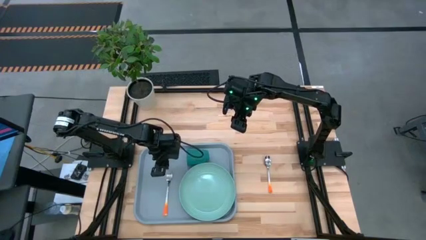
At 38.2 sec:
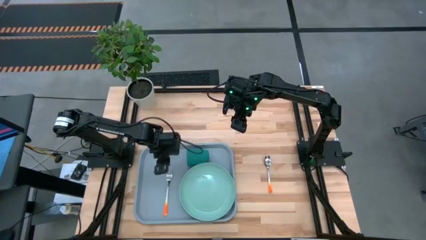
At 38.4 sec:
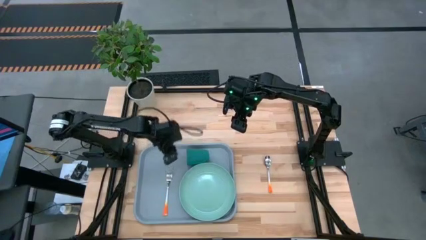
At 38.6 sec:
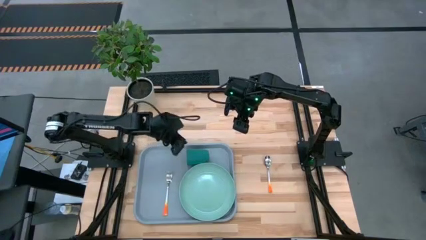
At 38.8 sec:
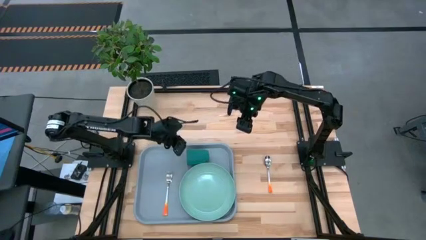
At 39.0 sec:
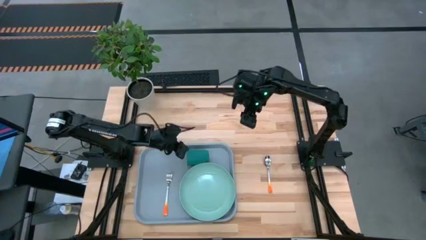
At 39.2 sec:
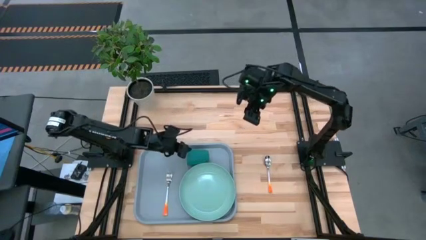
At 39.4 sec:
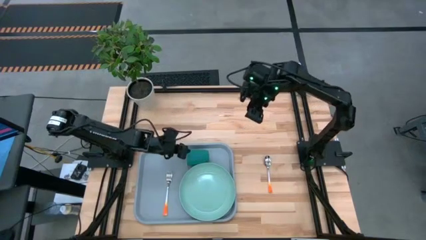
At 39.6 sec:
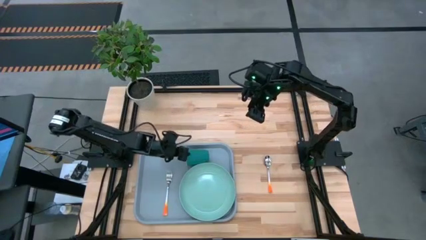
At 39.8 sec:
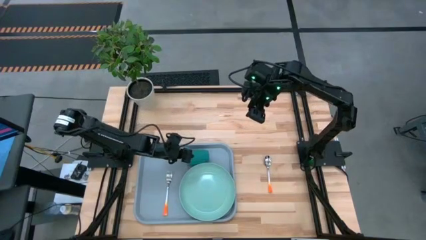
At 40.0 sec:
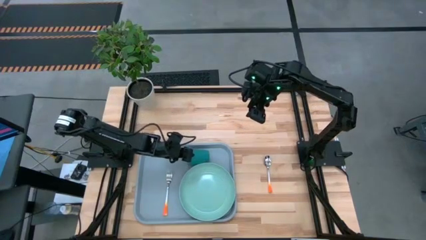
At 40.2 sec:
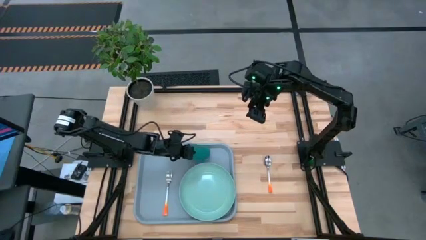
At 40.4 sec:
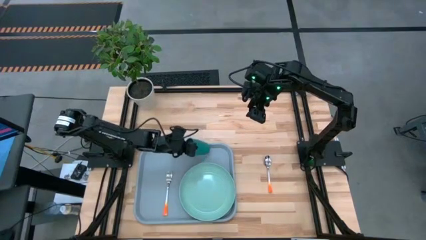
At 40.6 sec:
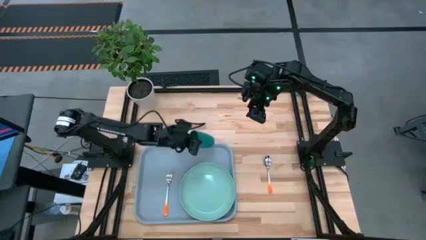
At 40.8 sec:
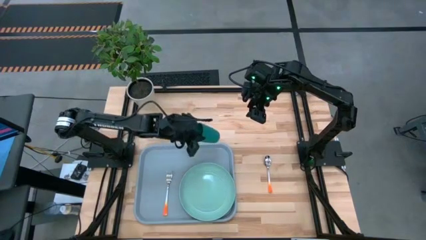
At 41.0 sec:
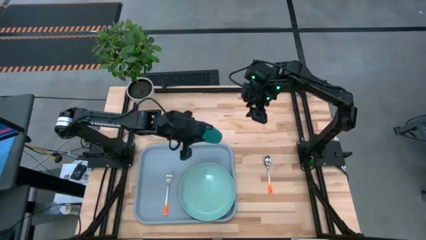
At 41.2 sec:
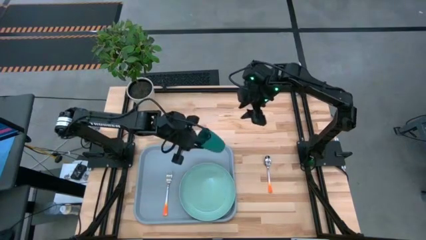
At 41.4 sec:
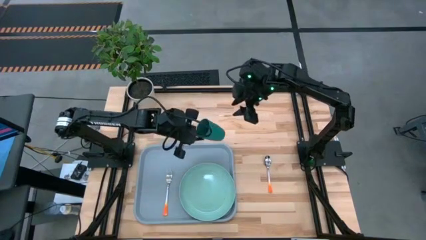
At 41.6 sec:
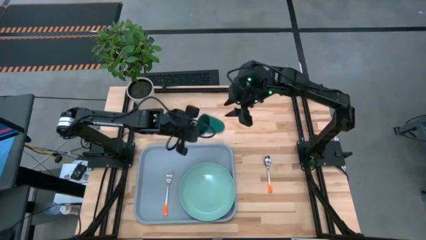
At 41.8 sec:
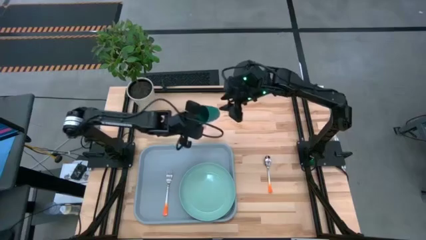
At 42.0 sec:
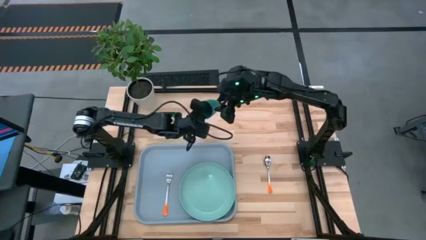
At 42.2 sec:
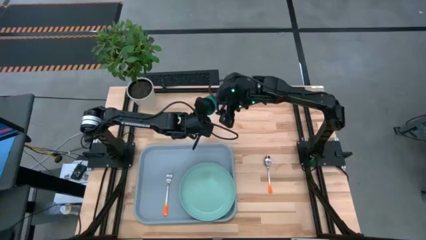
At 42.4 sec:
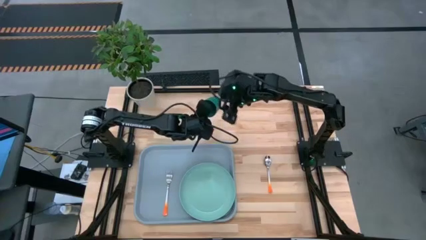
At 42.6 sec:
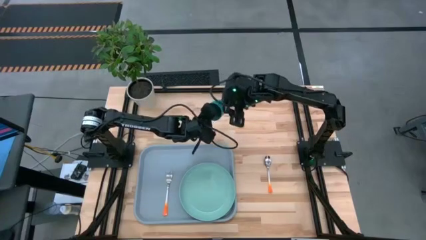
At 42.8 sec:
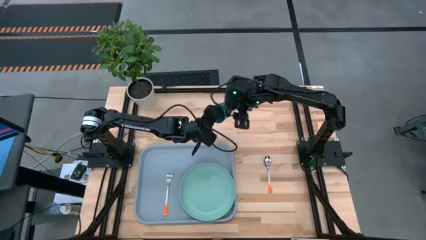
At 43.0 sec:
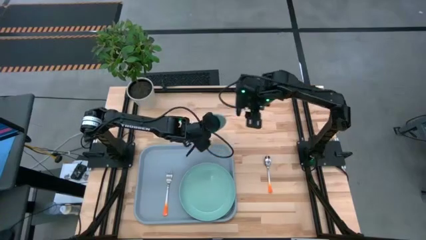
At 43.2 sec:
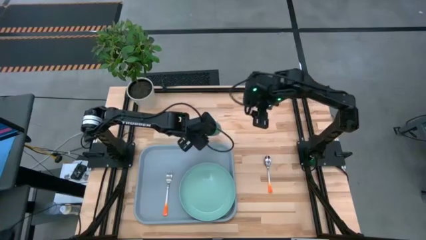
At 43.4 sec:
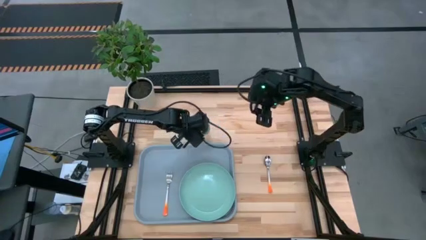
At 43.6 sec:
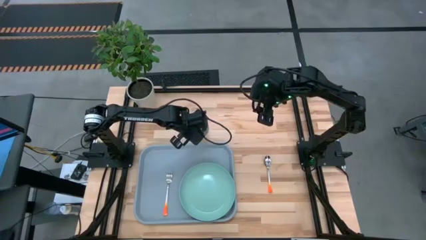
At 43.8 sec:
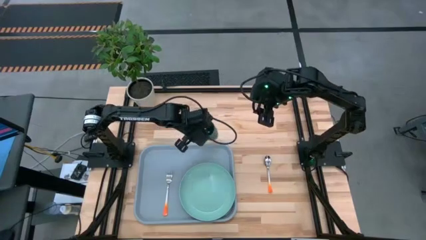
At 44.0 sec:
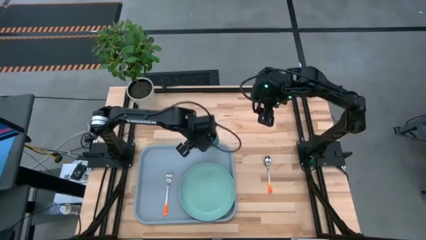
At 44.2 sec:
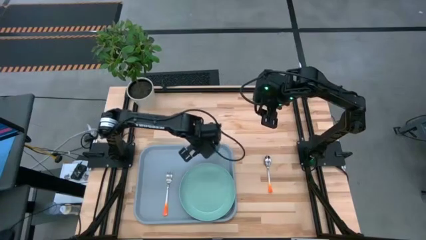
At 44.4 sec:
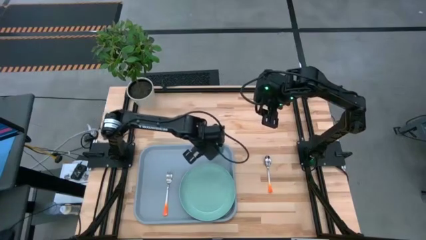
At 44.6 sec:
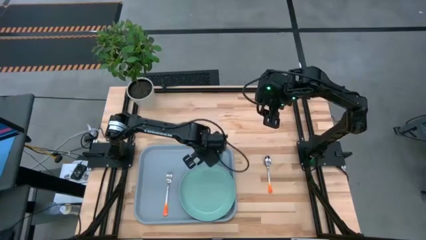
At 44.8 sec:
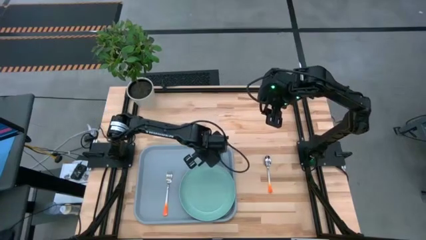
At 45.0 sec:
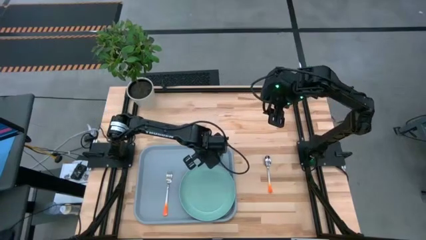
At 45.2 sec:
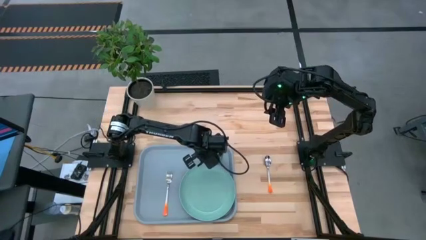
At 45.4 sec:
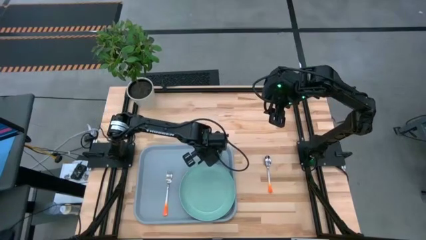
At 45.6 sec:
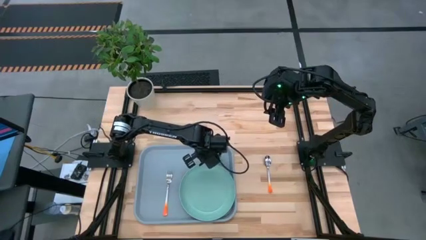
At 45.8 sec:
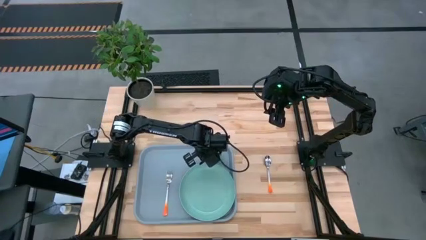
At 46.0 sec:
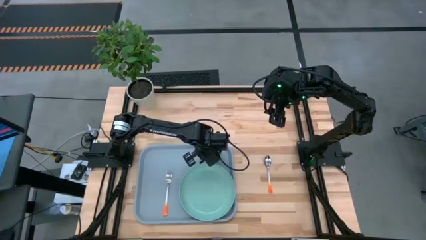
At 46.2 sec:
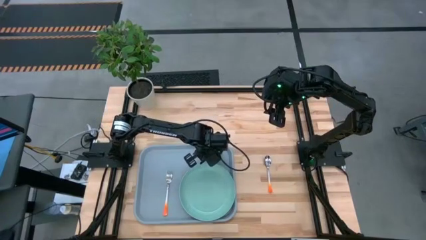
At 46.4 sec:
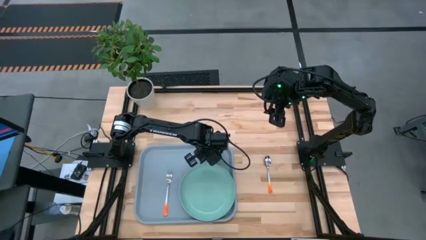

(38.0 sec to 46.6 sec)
Task: Pick and place plate/cup/fork/spoon on tray
Adjust the green cup

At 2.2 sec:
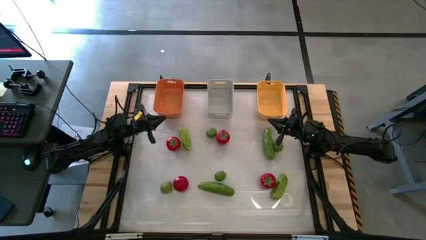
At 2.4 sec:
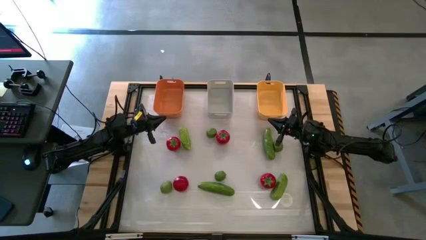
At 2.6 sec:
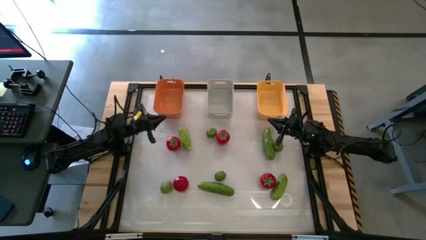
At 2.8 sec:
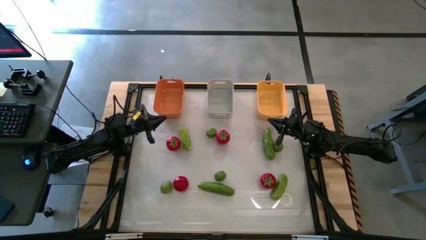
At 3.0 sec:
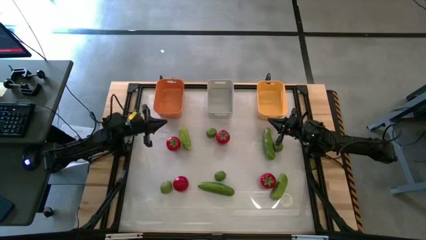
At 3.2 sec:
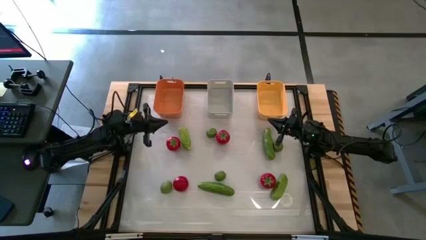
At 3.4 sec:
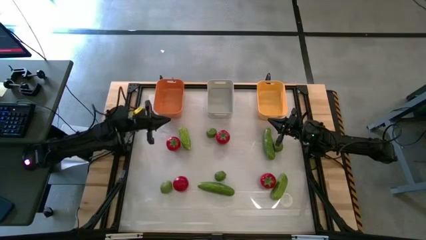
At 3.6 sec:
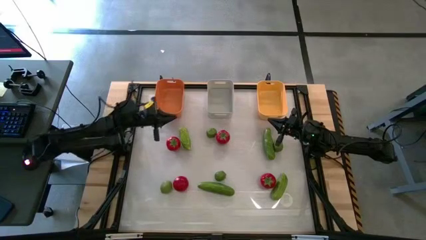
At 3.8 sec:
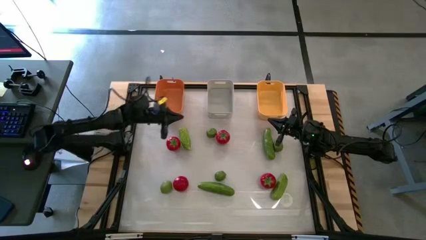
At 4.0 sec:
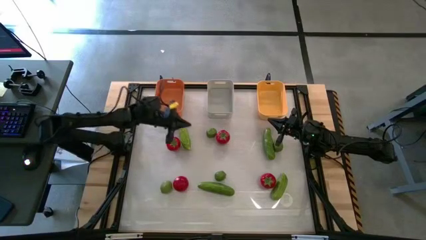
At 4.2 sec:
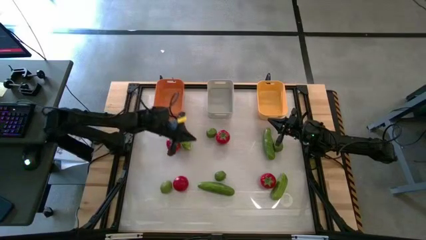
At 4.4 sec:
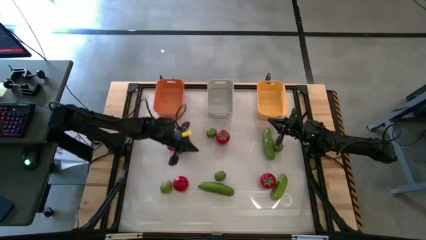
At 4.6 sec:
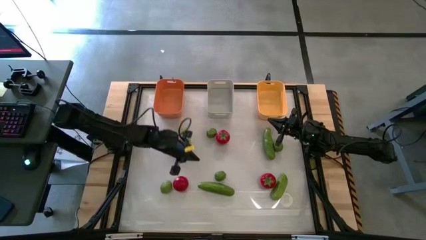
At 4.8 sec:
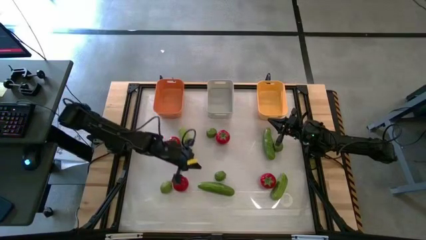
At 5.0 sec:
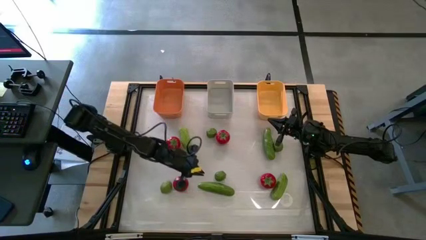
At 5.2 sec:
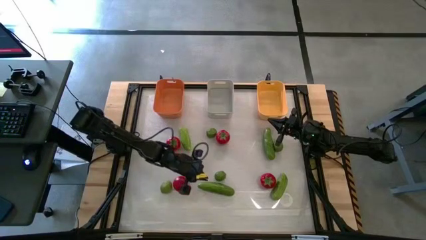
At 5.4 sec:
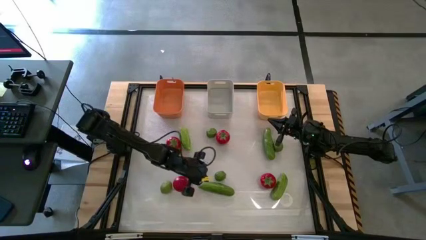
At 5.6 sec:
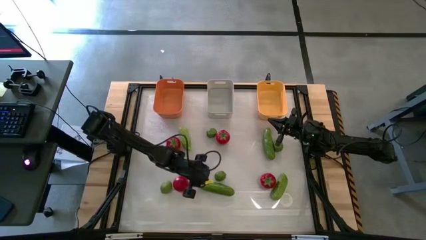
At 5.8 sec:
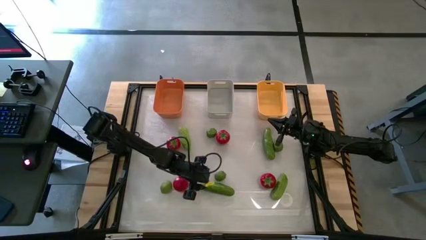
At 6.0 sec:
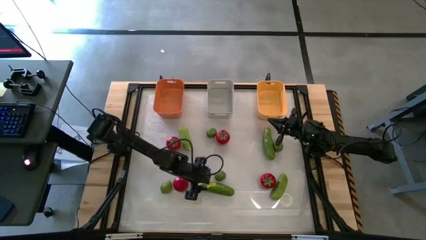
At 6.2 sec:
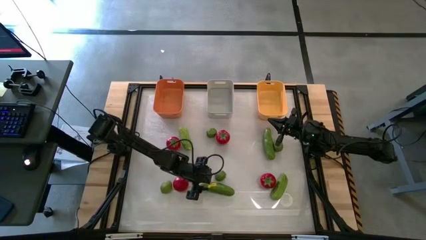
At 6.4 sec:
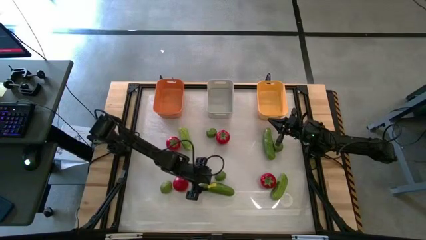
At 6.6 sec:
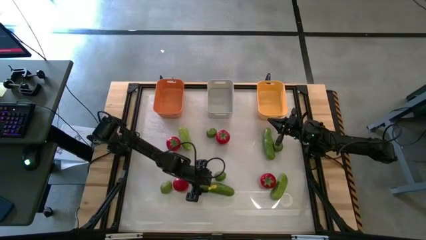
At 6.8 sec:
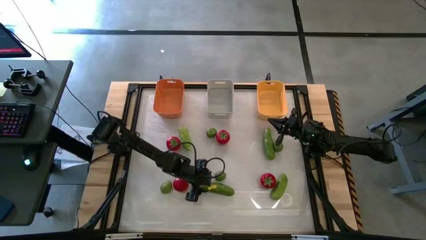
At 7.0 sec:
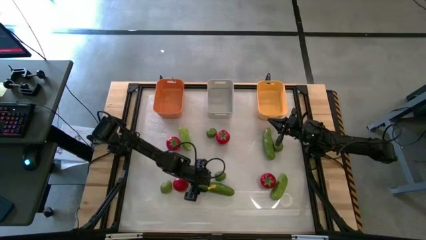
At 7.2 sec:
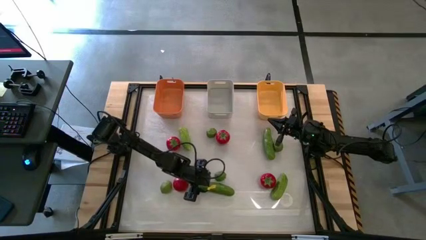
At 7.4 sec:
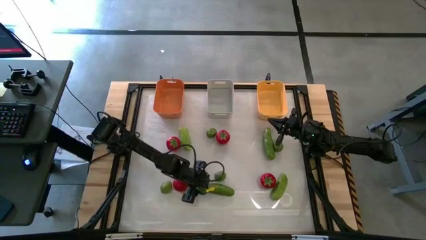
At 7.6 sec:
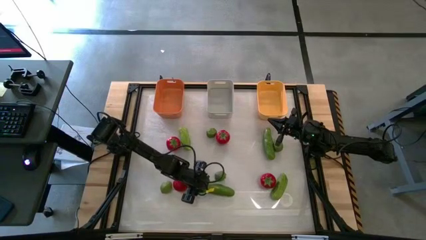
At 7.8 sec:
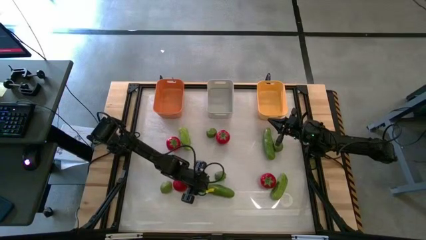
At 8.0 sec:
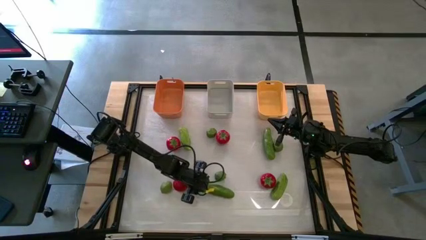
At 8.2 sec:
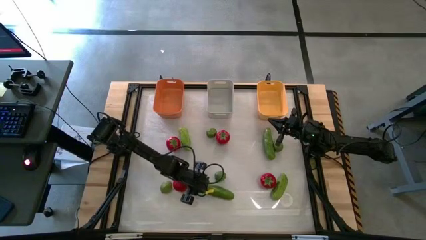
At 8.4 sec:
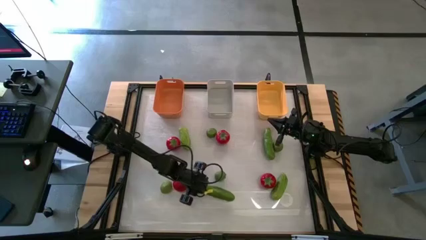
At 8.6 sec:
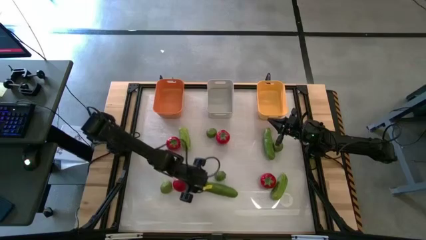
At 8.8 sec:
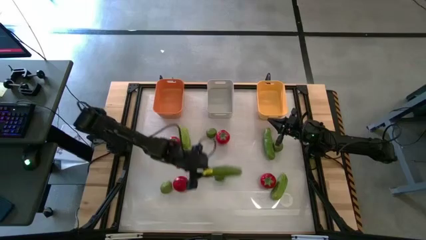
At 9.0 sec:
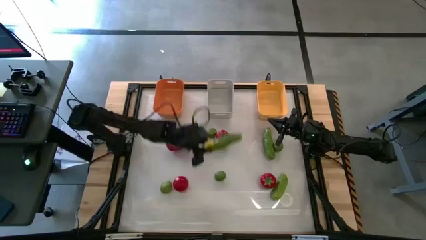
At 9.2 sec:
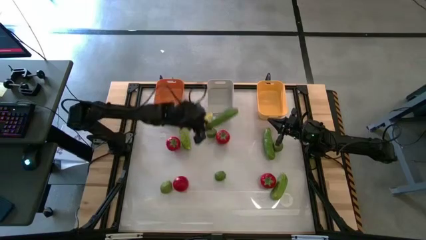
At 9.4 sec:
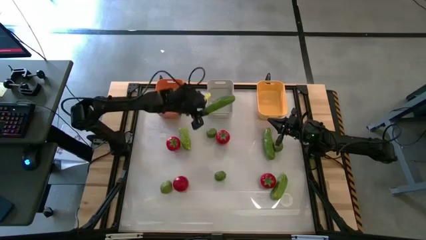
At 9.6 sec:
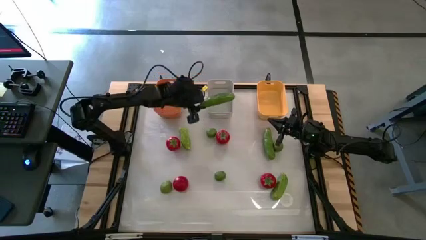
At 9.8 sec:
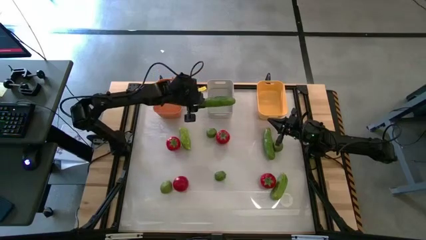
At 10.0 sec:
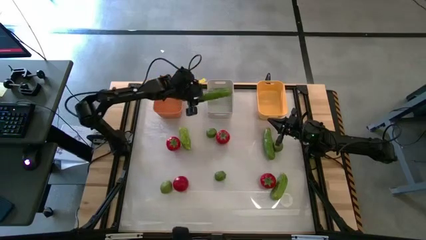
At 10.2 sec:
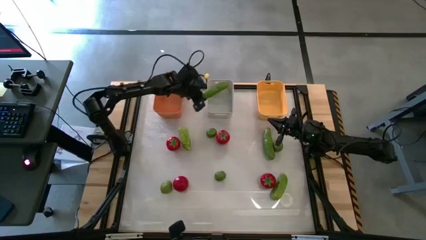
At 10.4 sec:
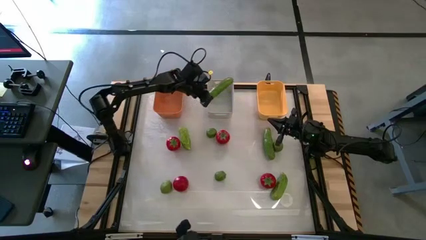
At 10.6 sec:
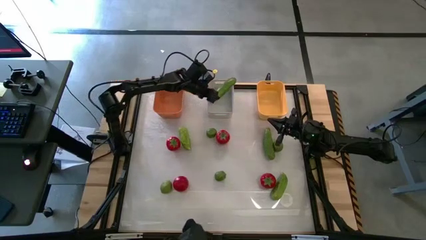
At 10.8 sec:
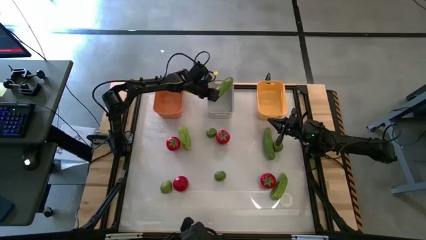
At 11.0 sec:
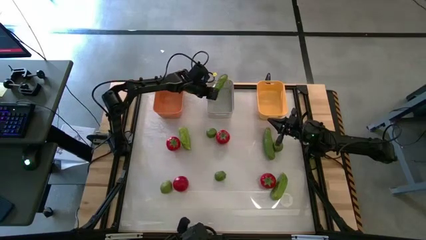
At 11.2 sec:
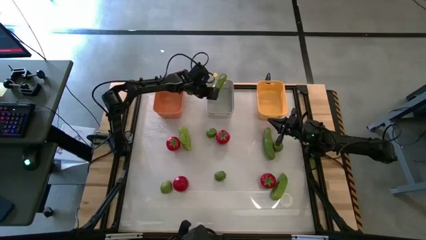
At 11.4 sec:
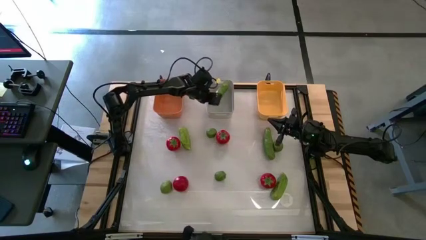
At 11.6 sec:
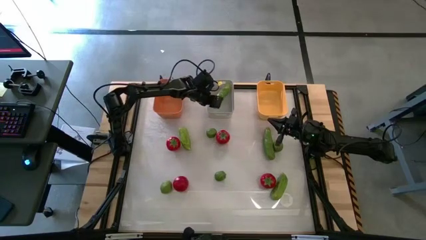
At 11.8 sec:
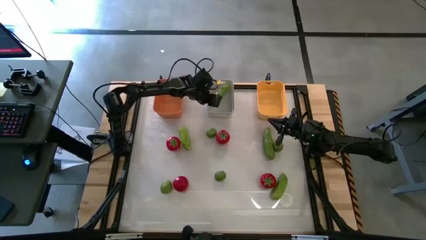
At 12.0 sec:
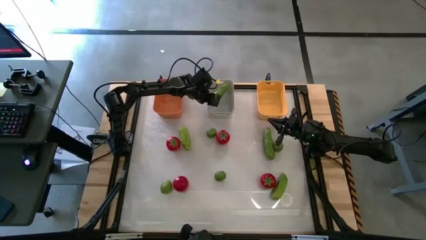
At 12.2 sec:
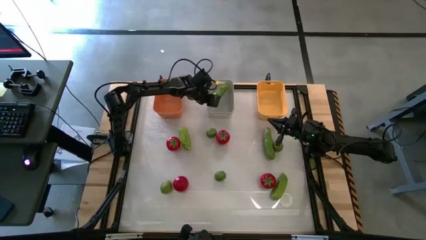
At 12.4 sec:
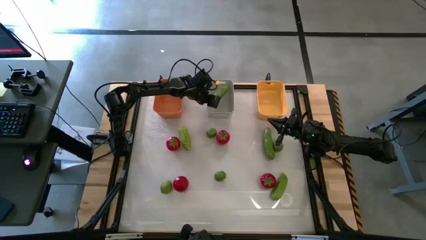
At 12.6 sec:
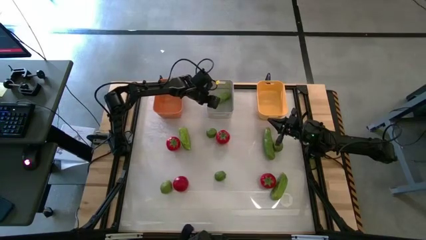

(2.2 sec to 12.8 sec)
Task: Sort produce into baskets
Put the bottom left cucumber into the gray bin
